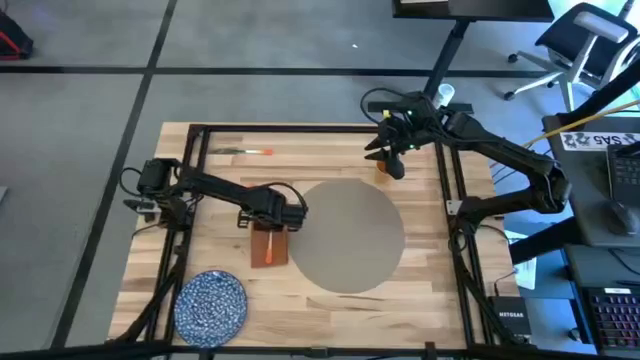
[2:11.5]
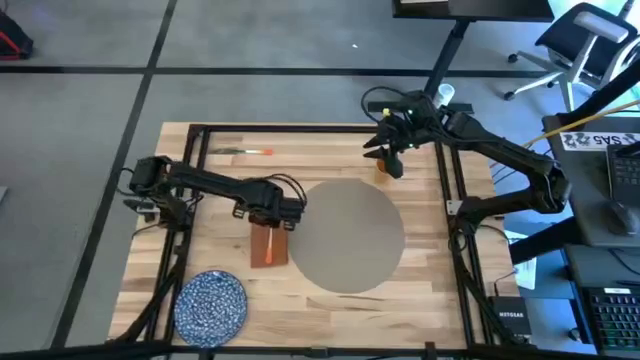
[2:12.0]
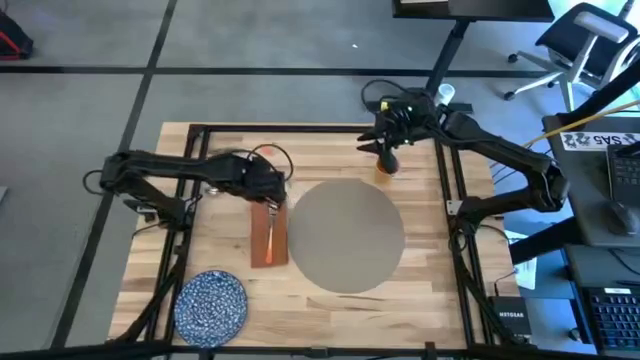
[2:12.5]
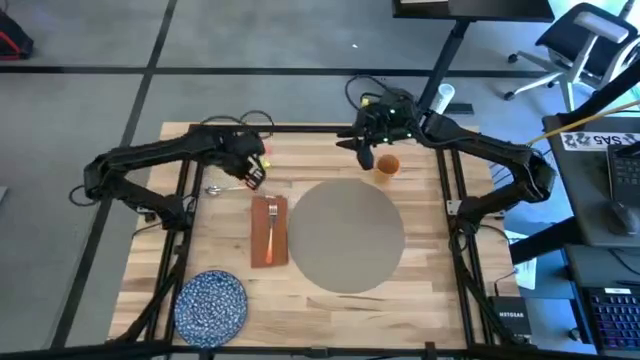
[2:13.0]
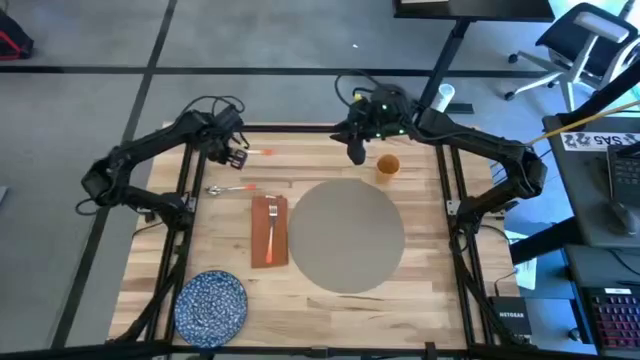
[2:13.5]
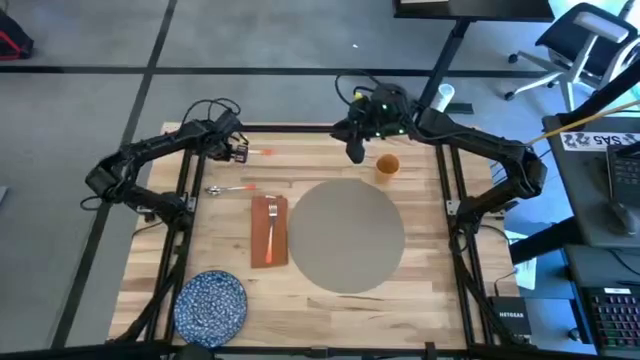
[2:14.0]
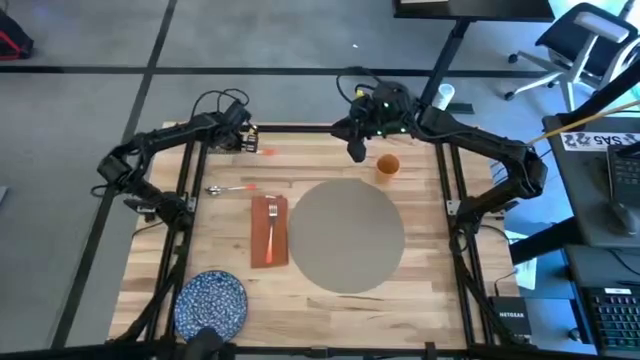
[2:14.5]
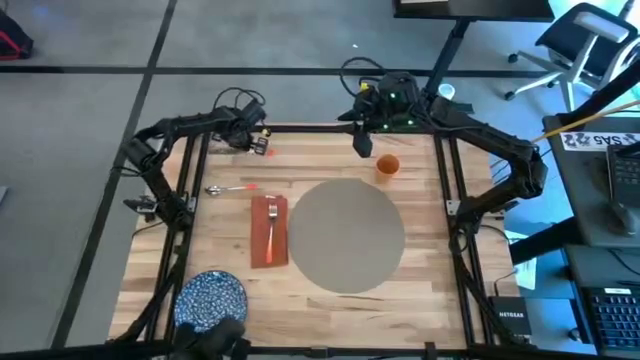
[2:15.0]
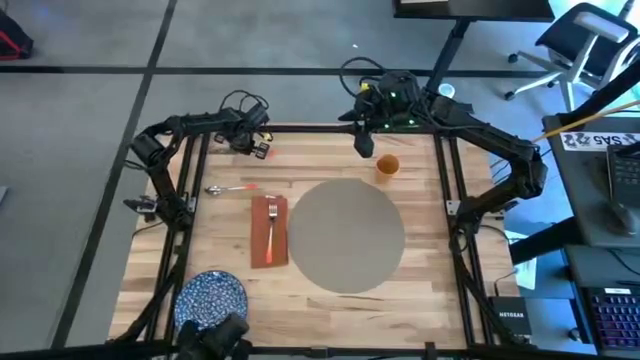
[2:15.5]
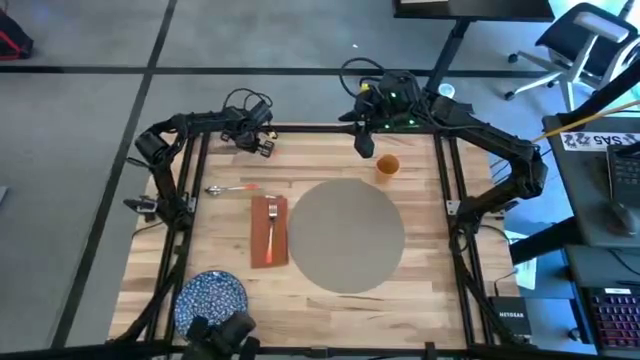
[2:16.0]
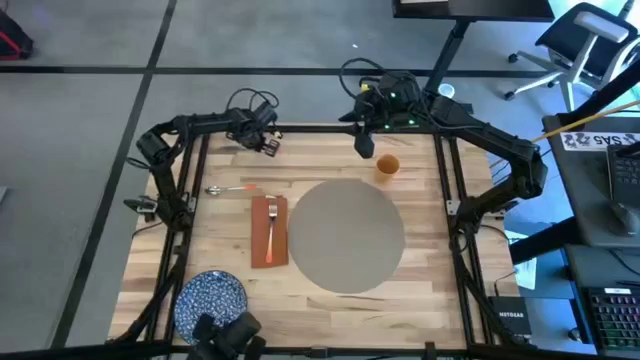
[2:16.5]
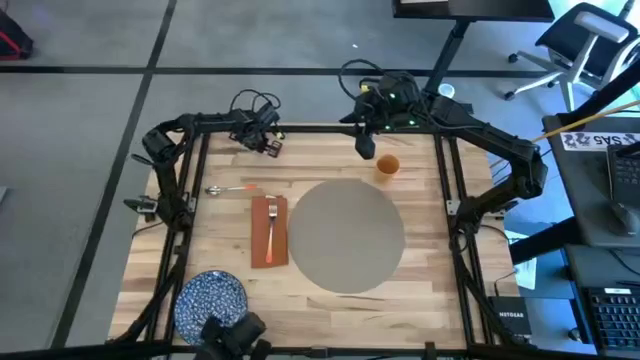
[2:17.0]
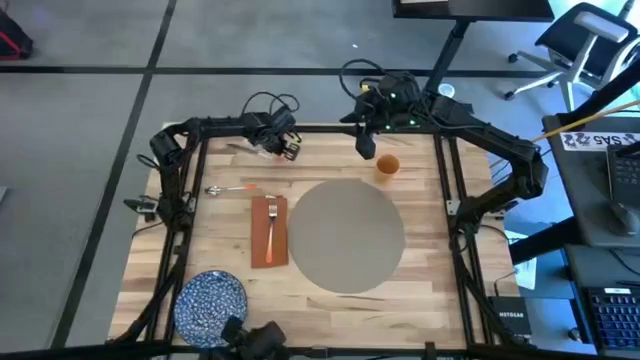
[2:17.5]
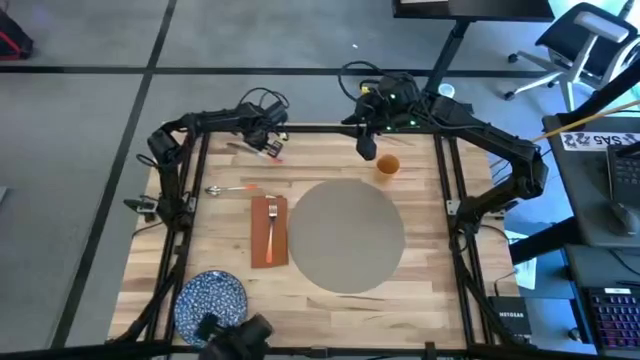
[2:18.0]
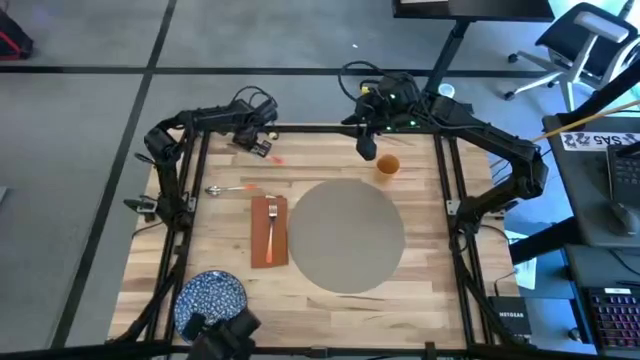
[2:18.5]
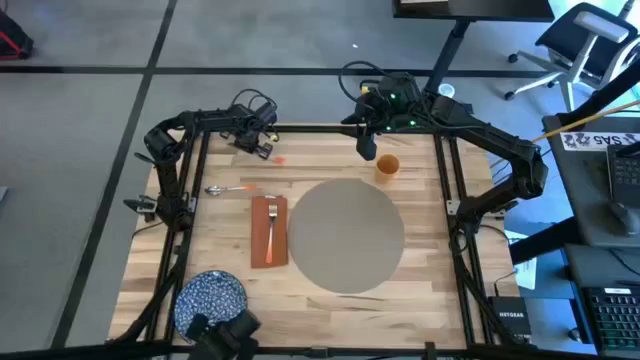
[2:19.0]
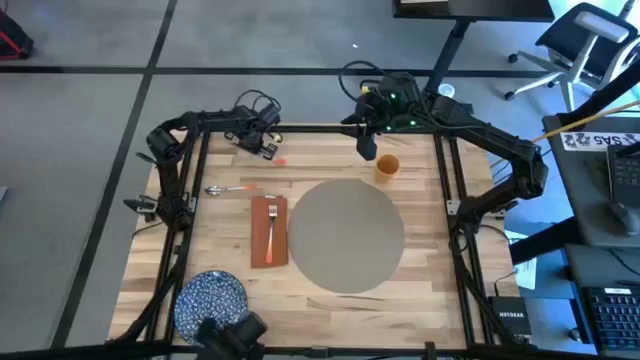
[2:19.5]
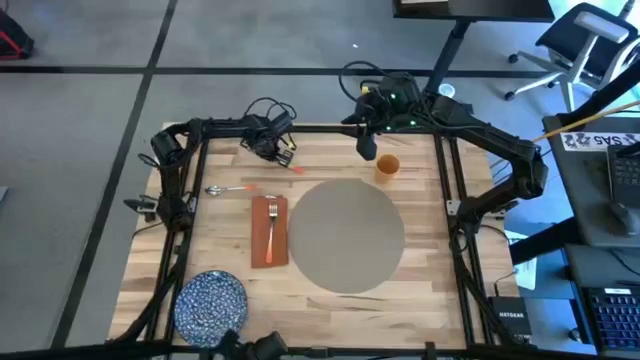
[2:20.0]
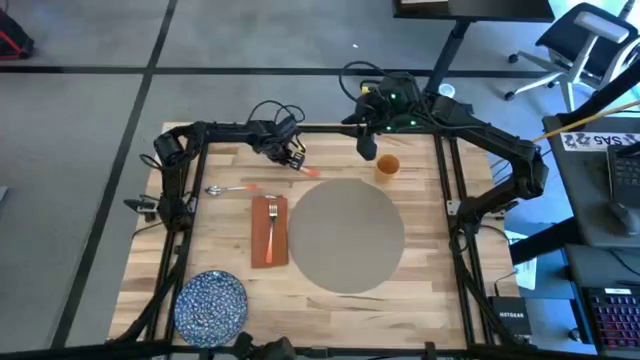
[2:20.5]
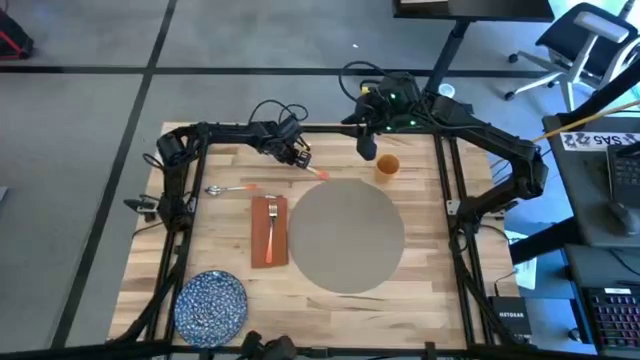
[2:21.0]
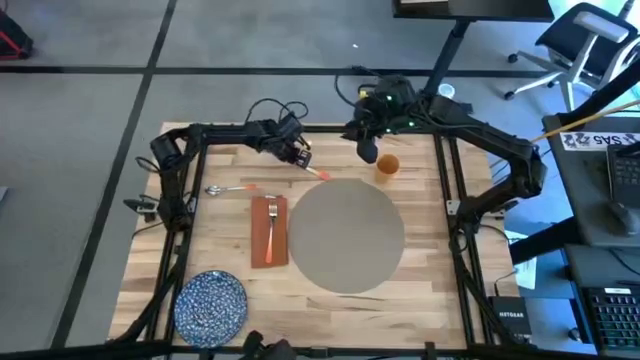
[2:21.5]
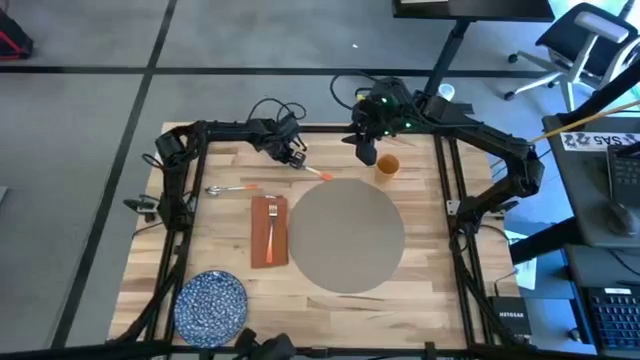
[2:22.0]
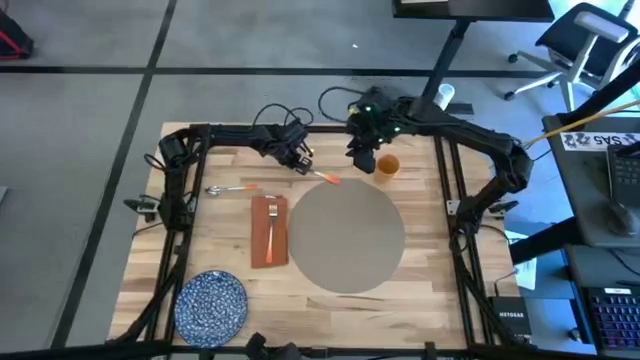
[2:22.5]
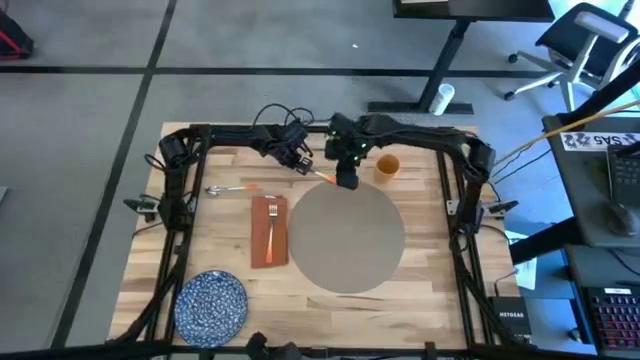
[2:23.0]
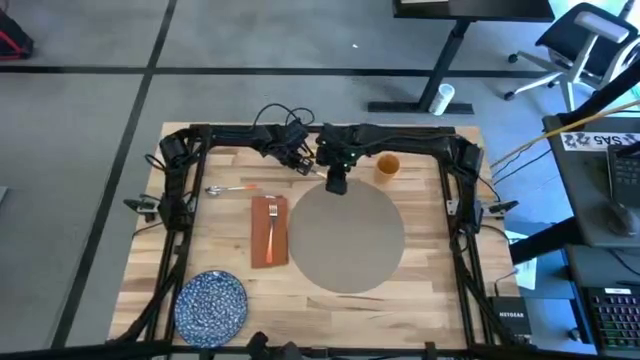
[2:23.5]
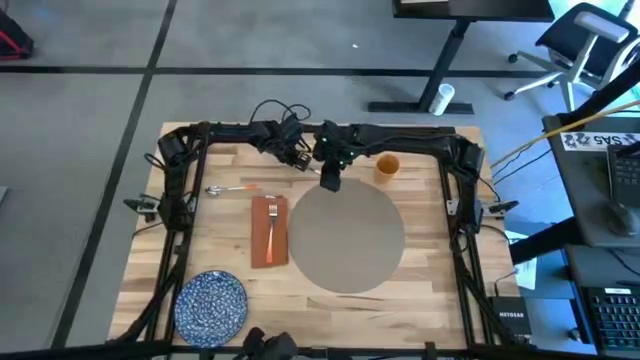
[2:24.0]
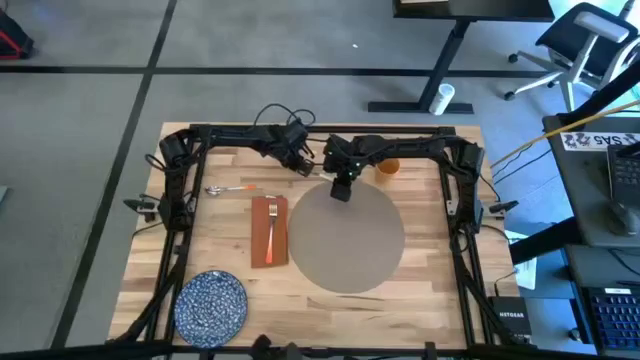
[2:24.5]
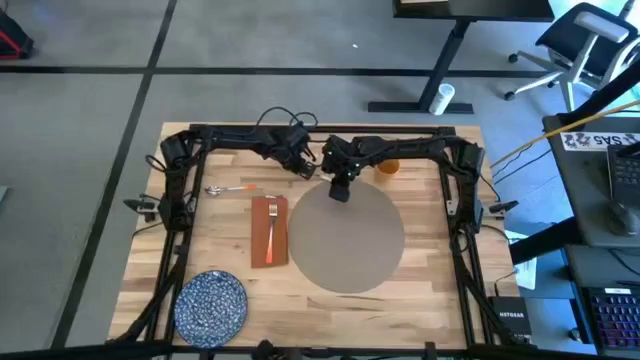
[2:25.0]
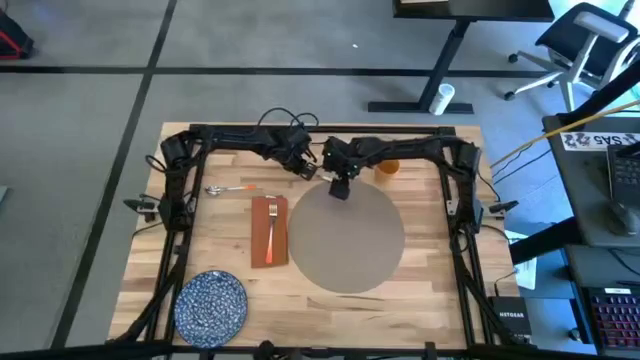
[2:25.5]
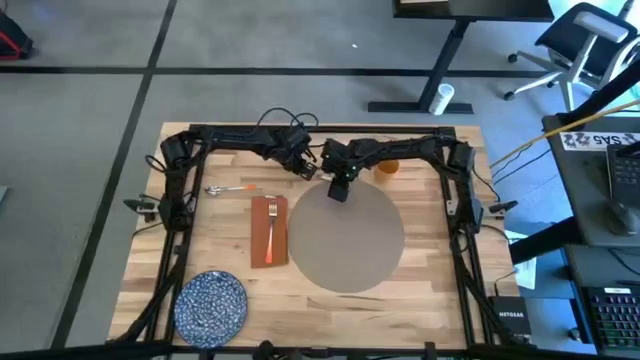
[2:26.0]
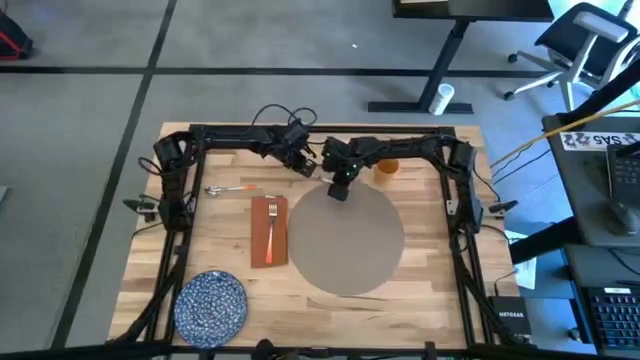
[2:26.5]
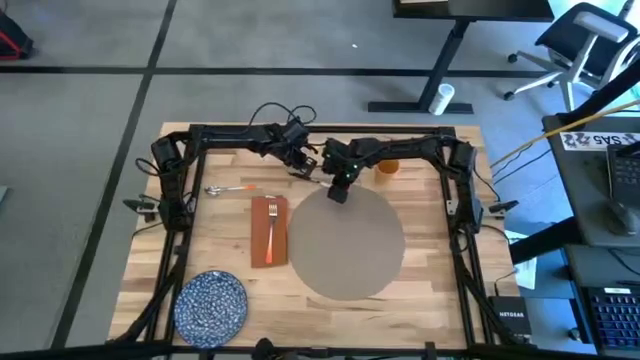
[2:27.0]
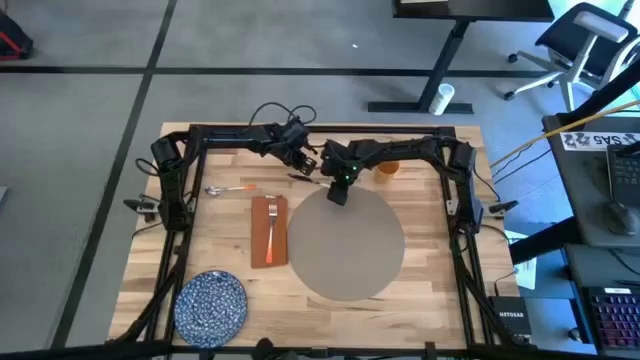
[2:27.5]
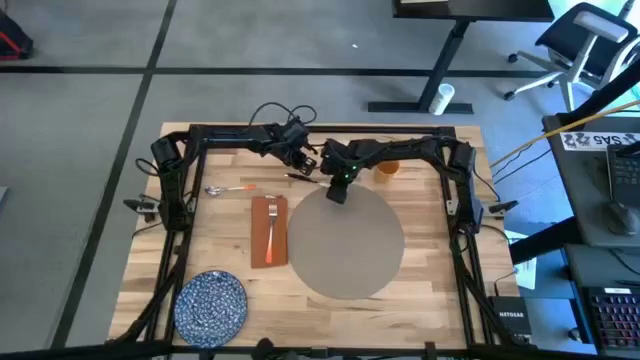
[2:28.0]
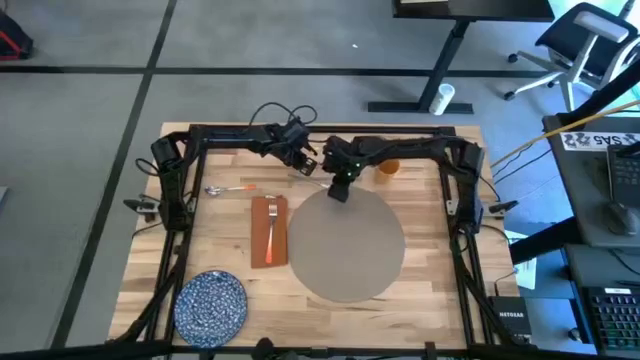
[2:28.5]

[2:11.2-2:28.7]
Task: Set table place
Put the orange knife on the gray mat

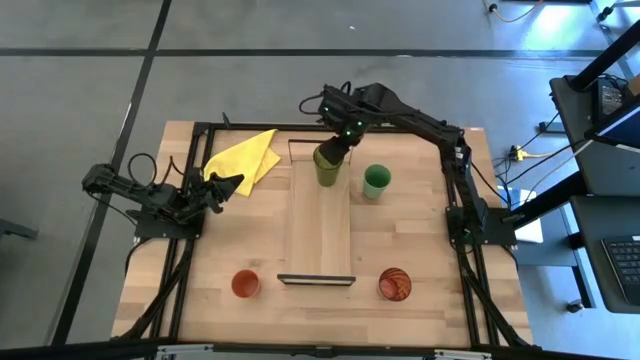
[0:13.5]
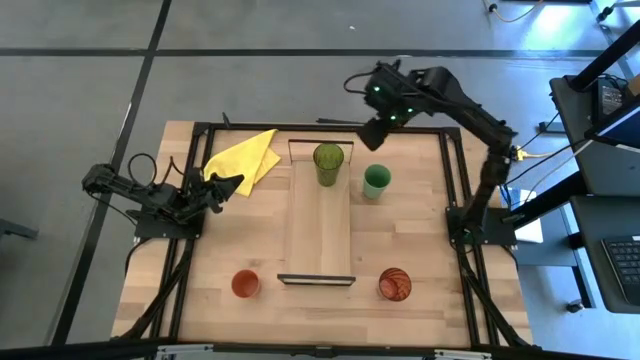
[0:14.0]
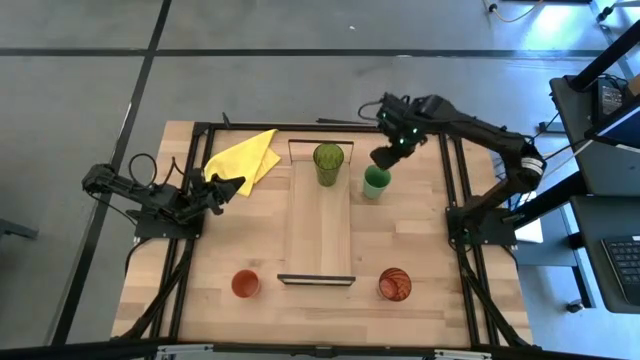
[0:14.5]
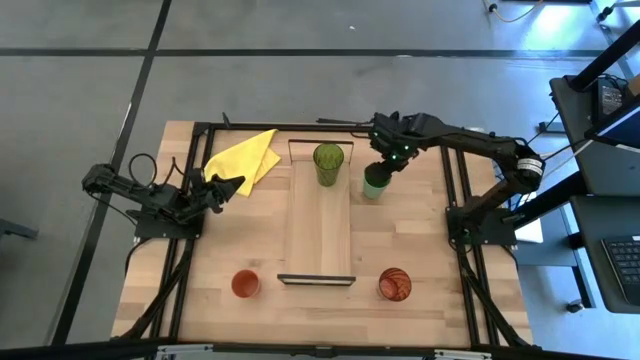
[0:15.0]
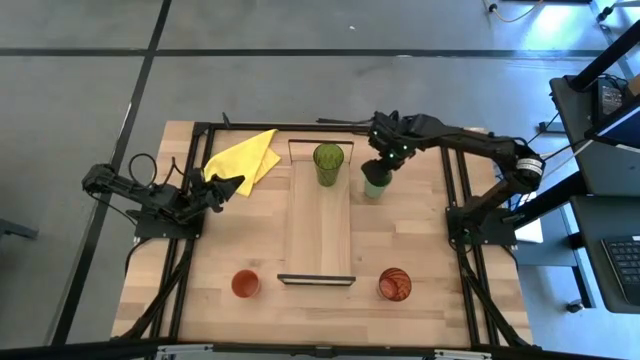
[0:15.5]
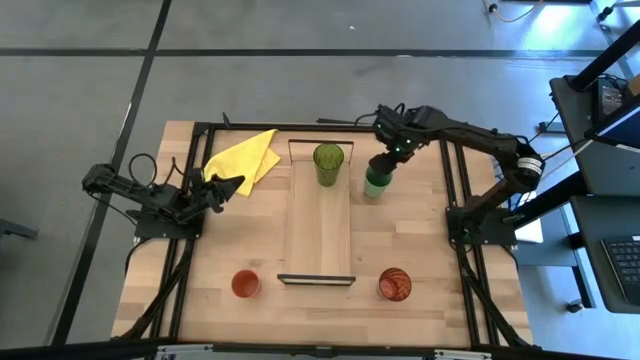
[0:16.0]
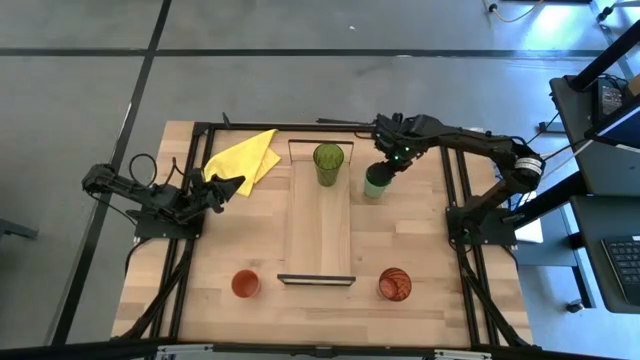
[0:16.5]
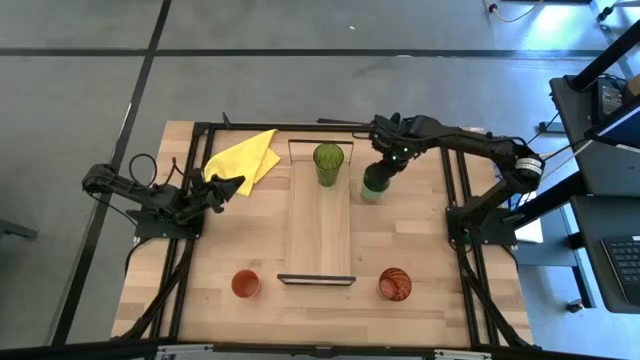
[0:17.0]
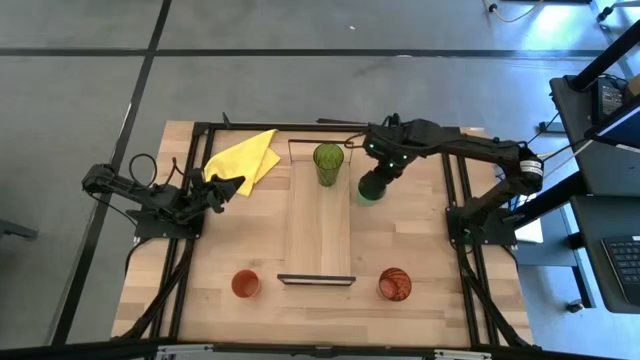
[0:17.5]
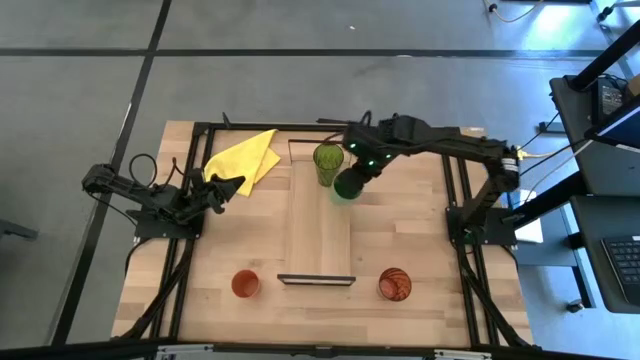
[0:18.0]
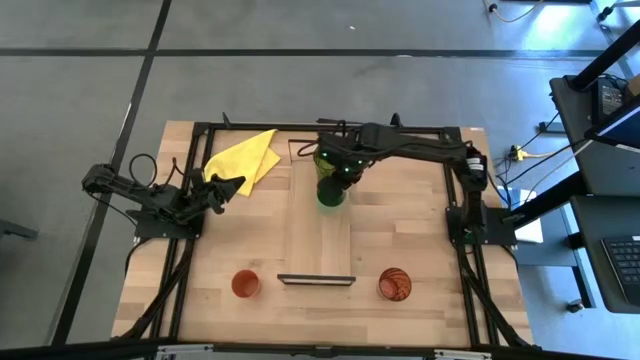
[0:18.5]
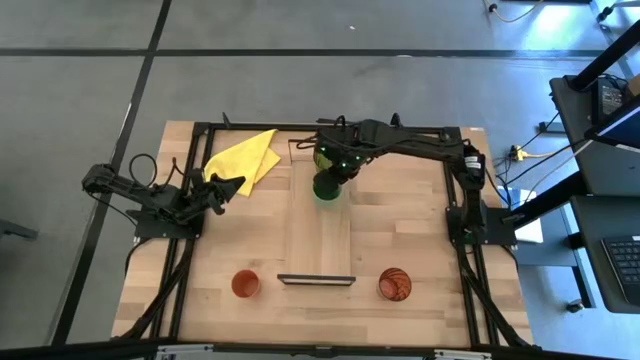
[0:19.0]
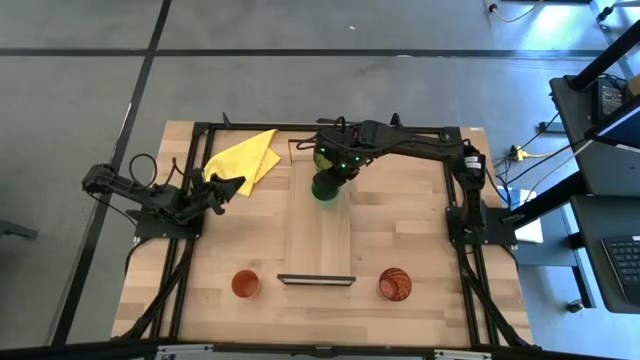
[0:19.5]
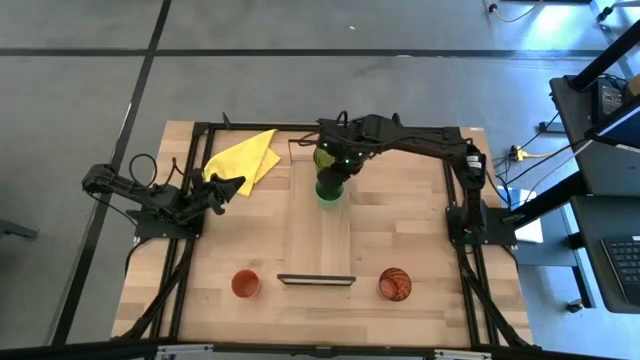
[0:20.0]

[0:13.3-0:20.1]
Task: Stack small to large cups/mugs on shelf
Put the light green cup on the shelf
